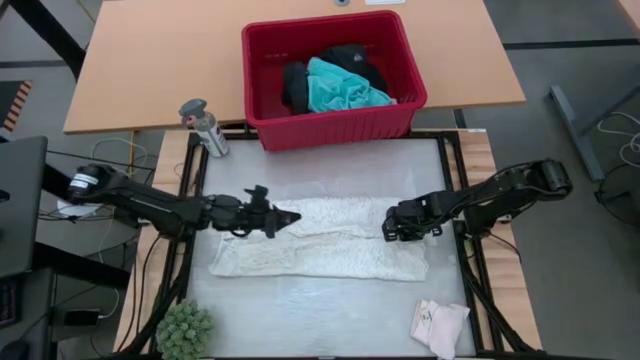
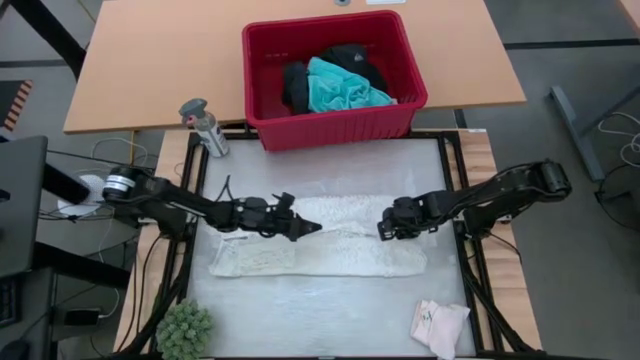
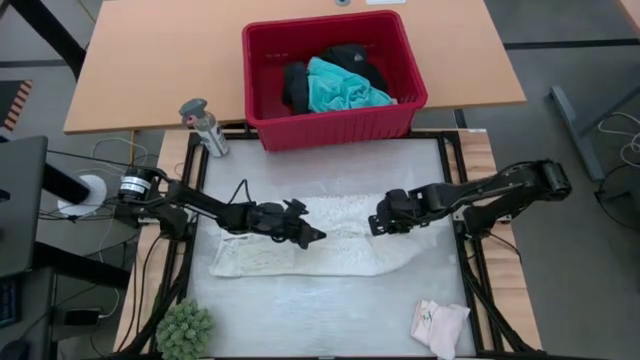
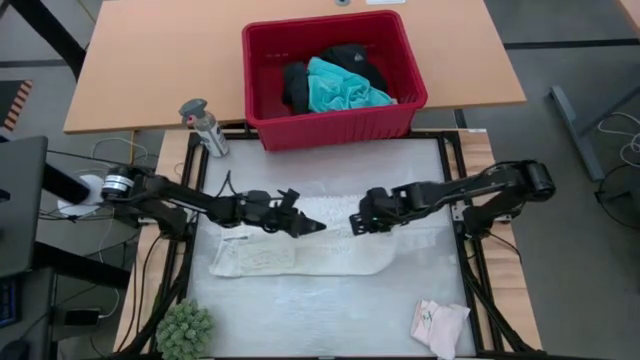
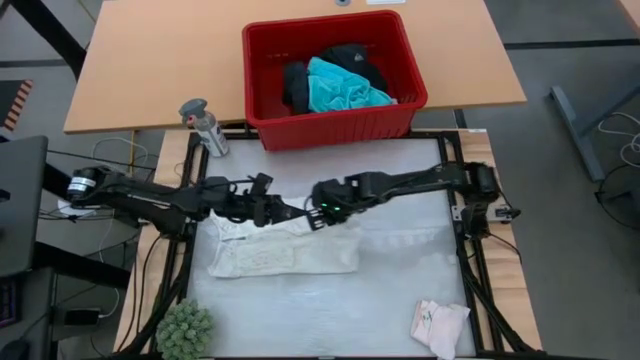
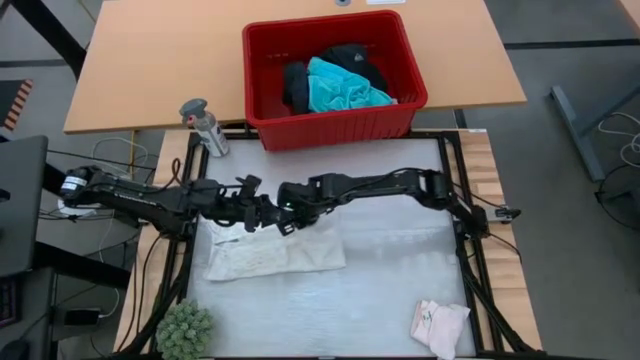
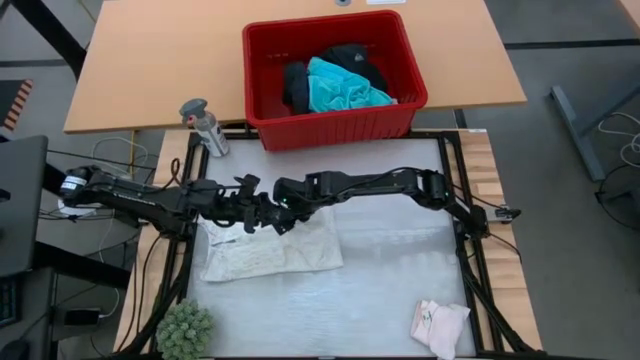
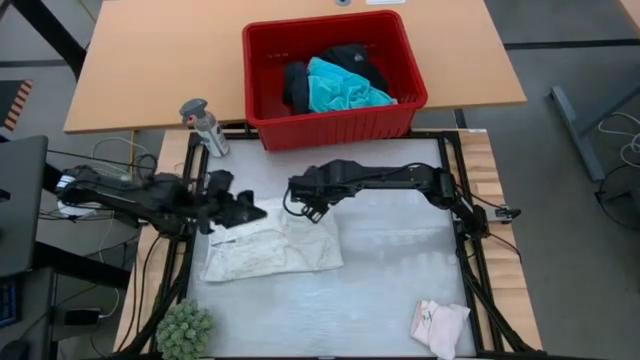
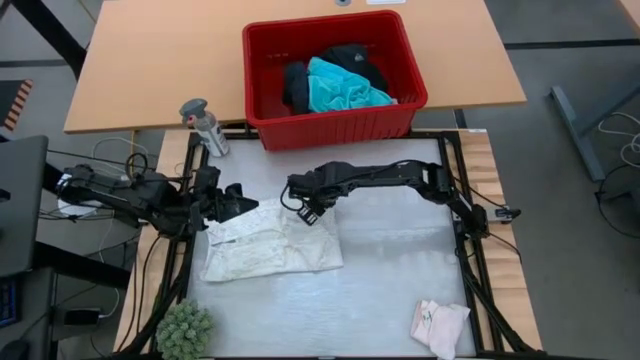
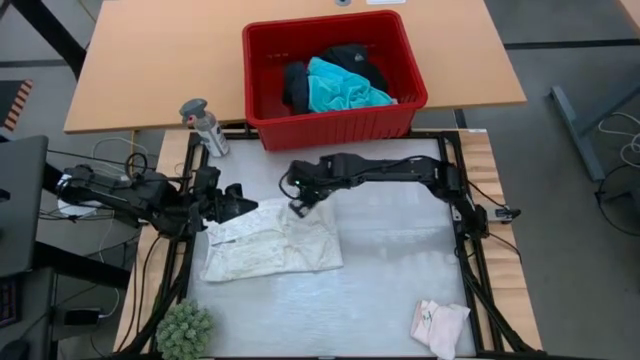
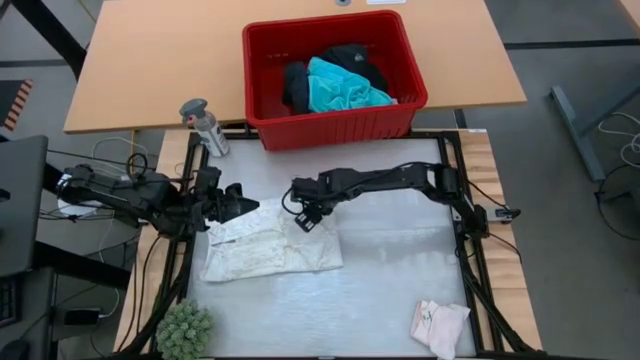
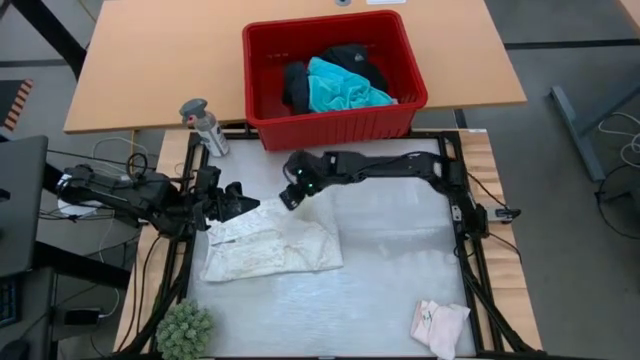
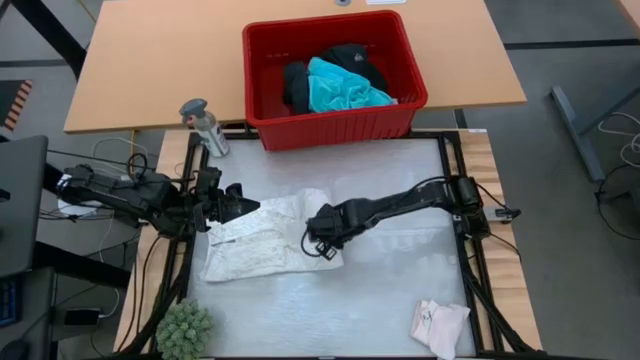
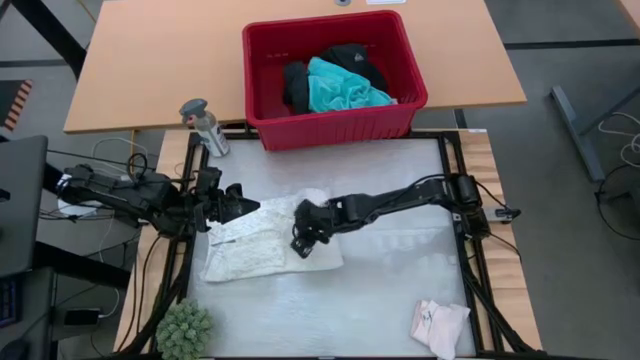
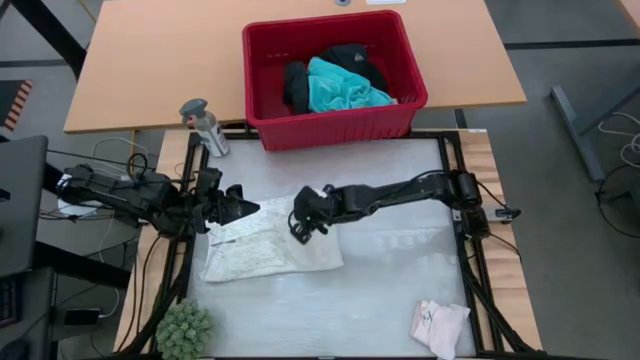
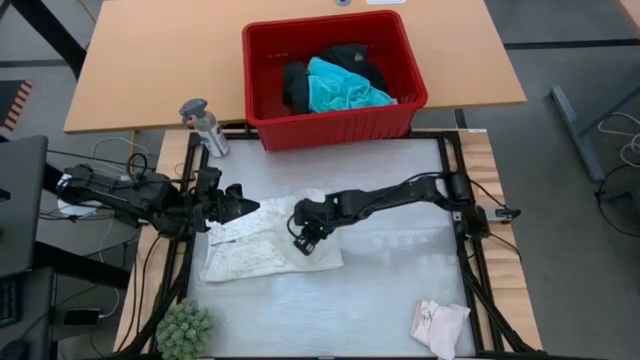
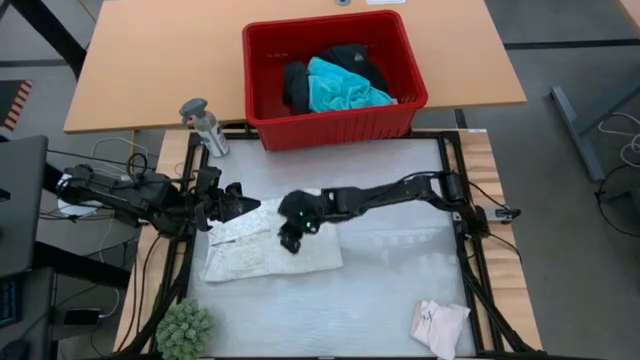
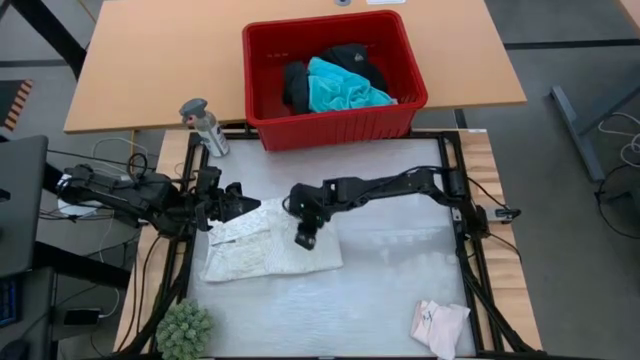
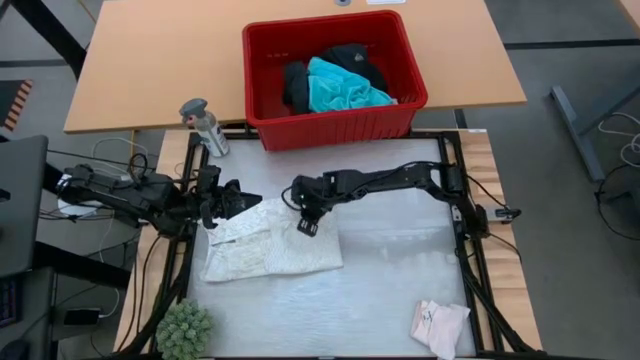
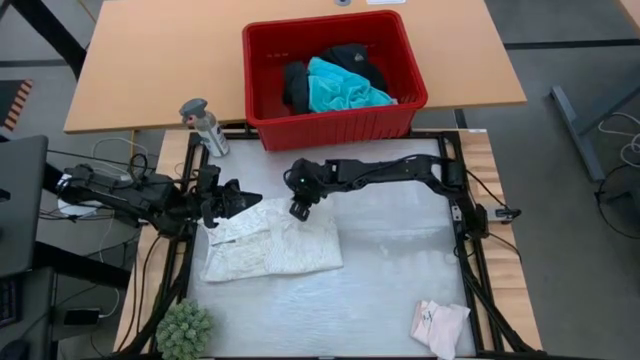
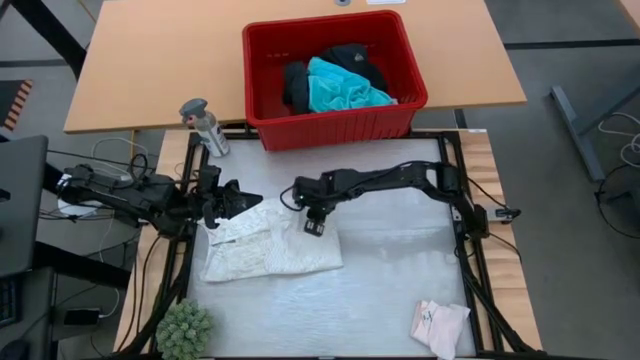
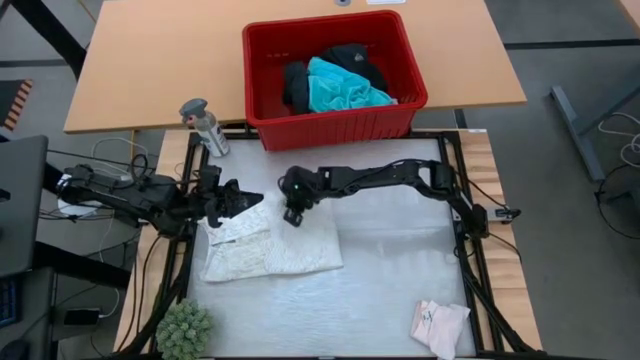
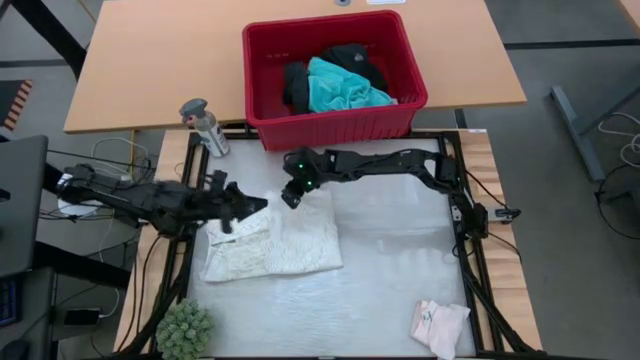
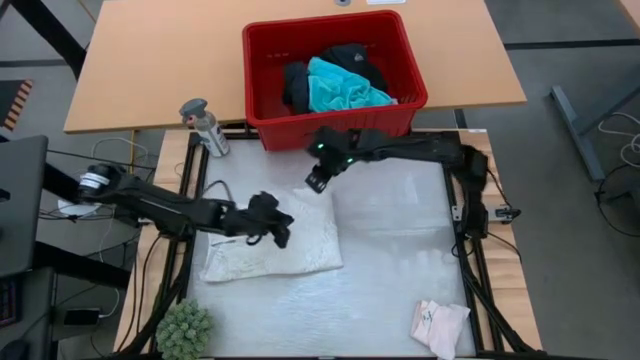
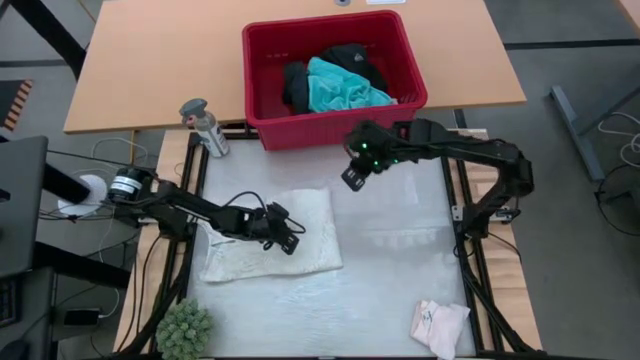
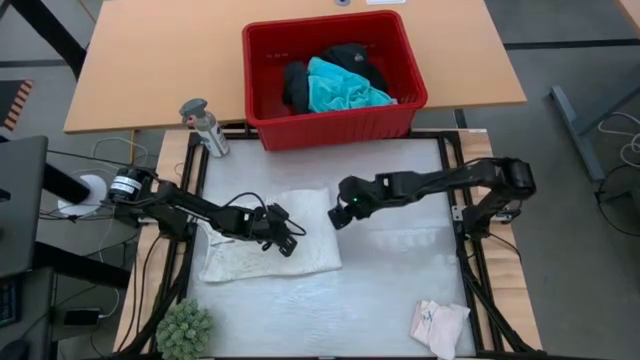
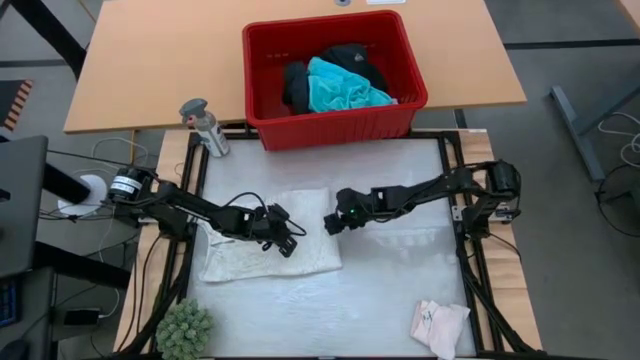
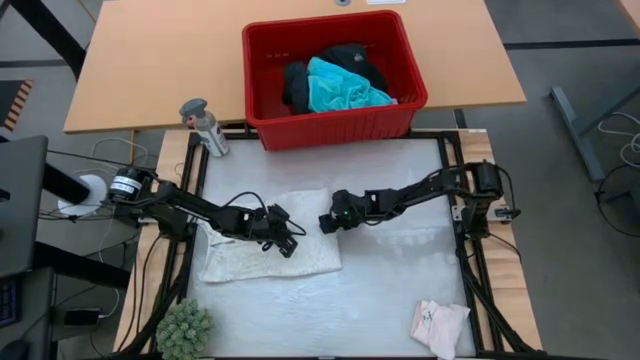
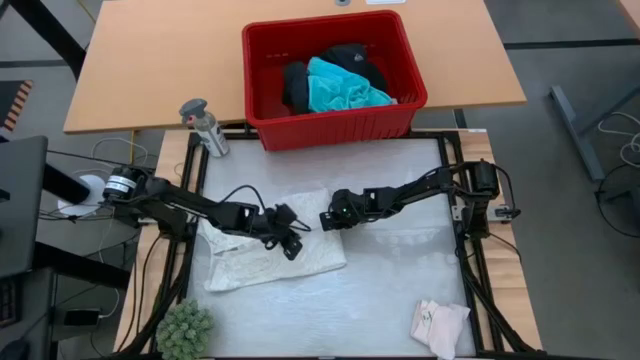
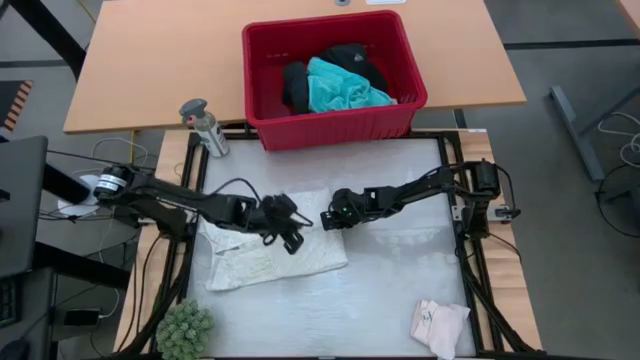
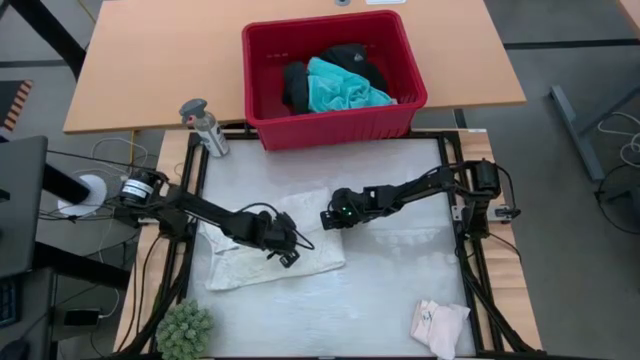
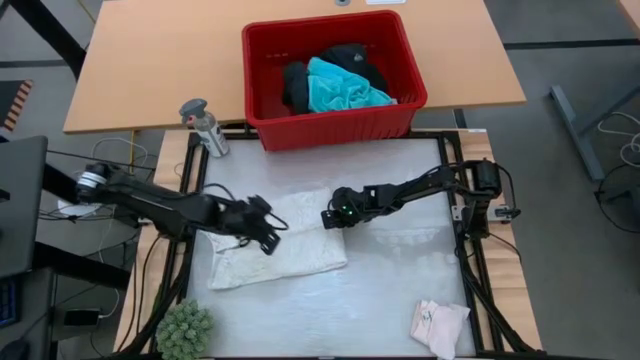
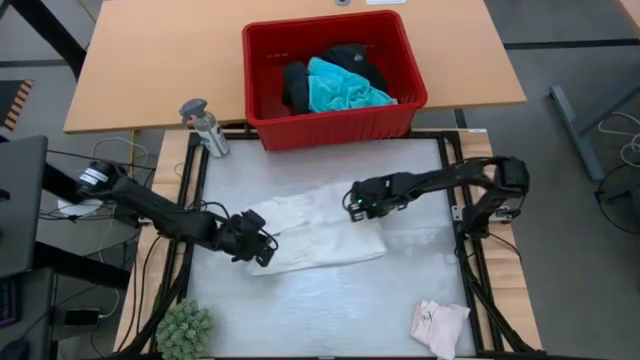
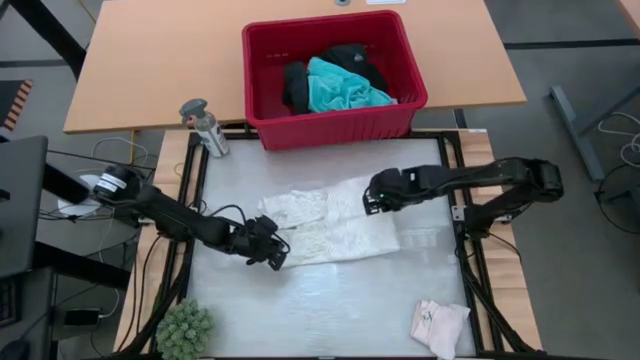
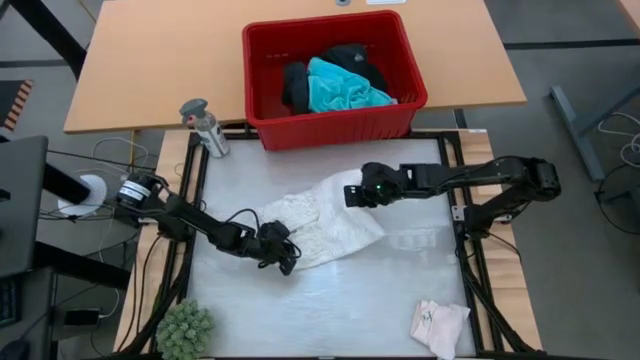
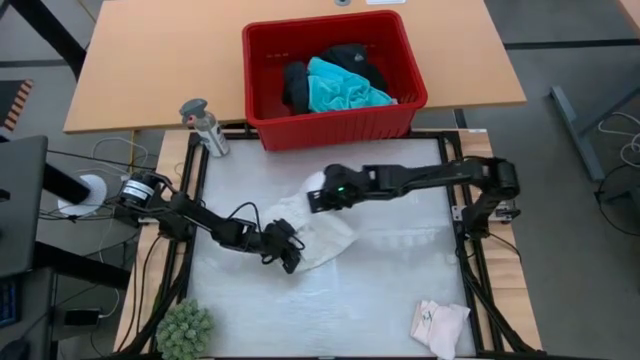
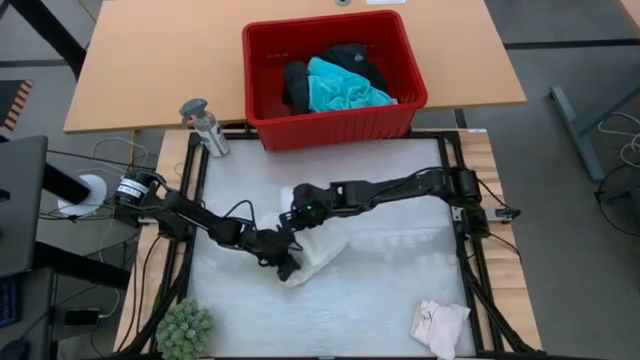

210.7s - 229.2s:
Task: Fold Laundry from Bin
Fold the white blouse
